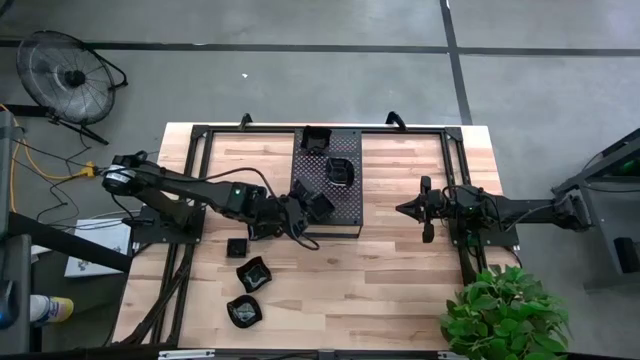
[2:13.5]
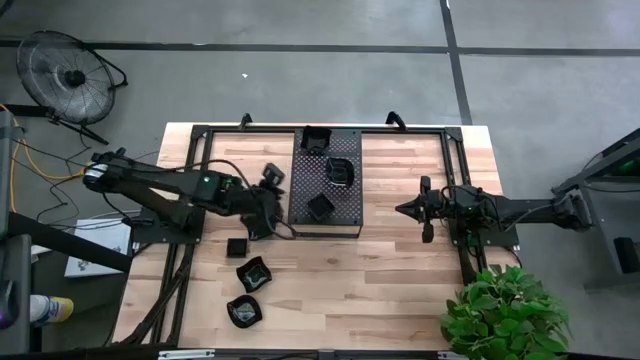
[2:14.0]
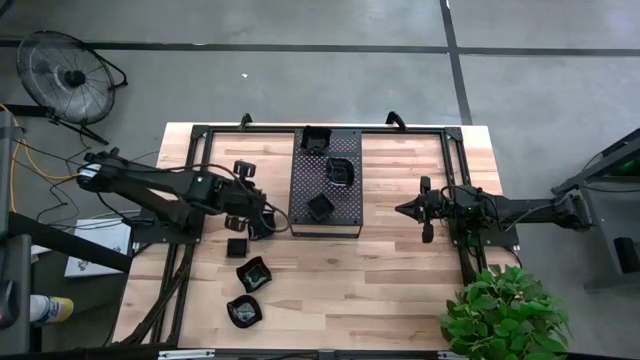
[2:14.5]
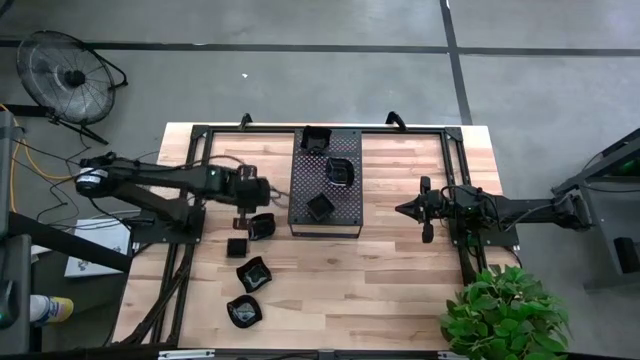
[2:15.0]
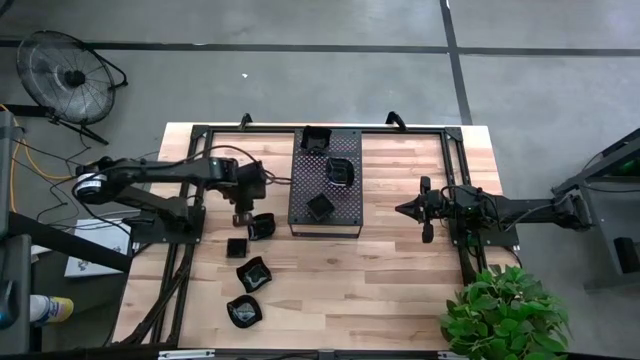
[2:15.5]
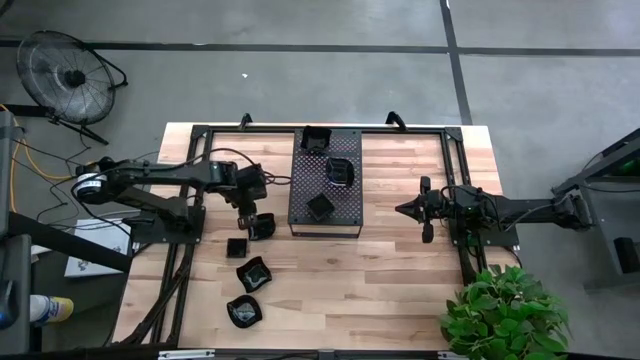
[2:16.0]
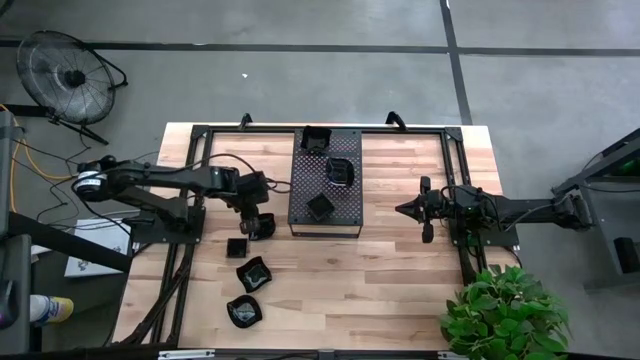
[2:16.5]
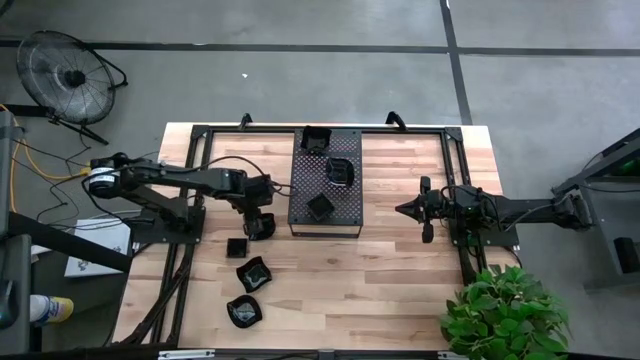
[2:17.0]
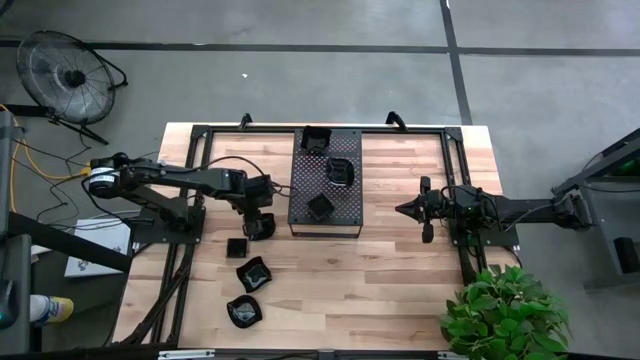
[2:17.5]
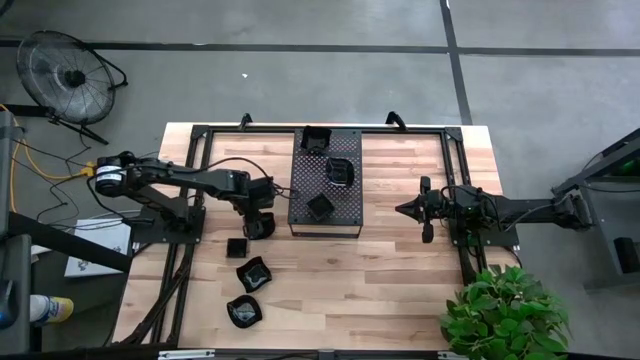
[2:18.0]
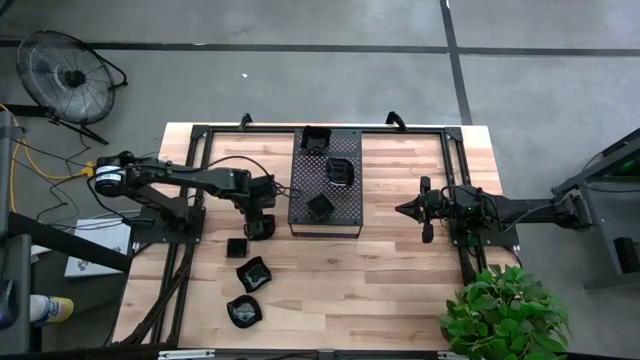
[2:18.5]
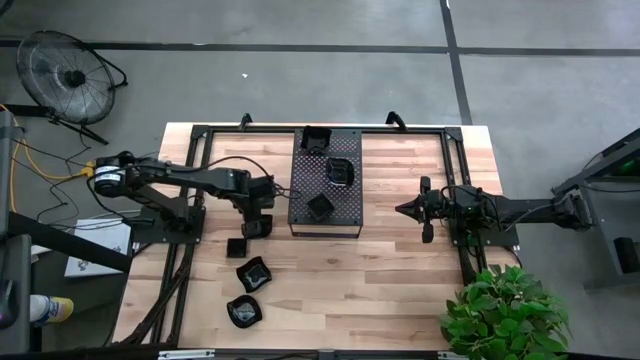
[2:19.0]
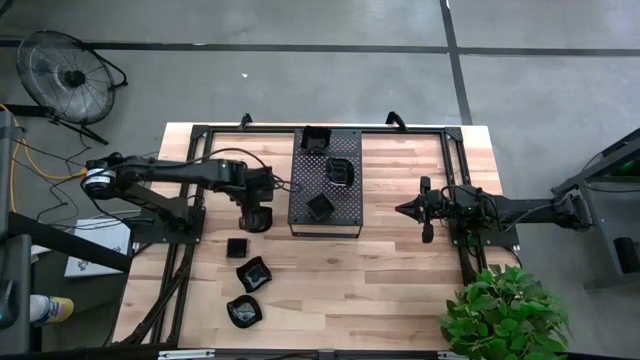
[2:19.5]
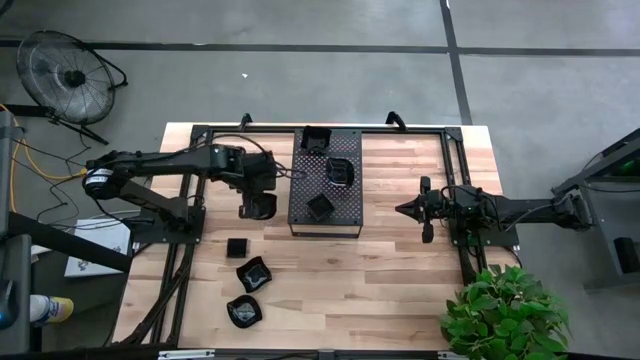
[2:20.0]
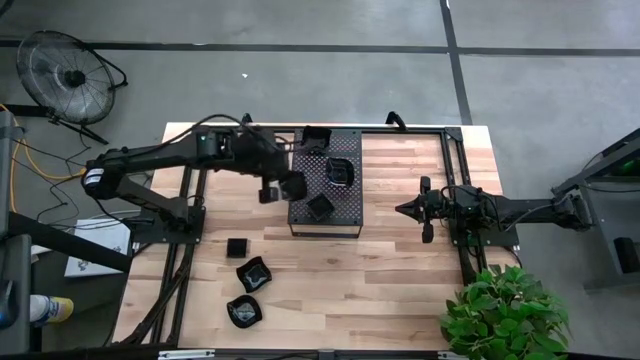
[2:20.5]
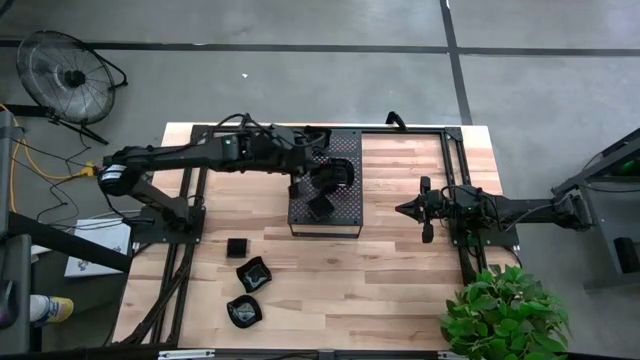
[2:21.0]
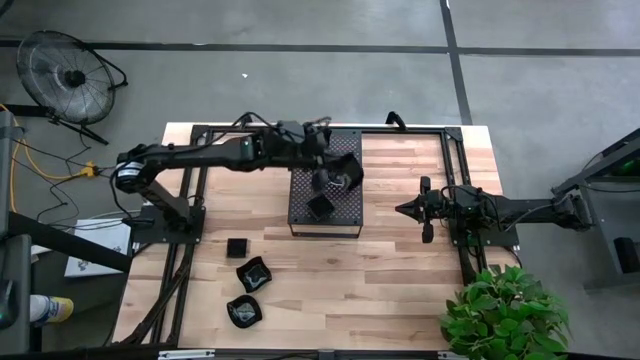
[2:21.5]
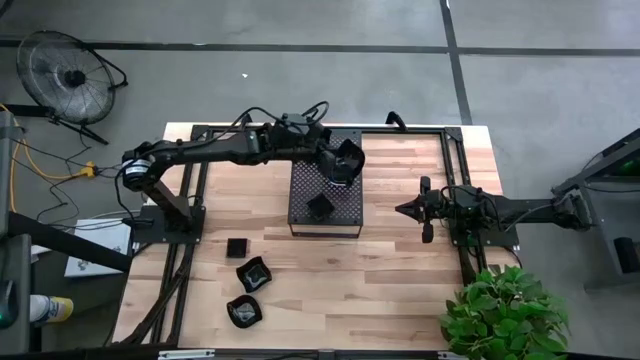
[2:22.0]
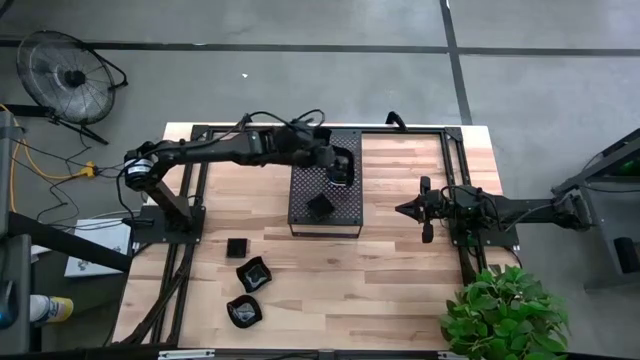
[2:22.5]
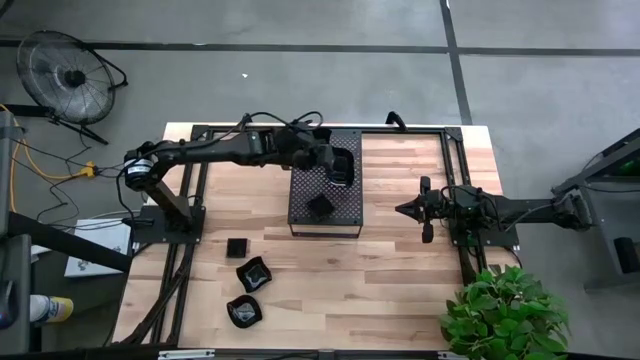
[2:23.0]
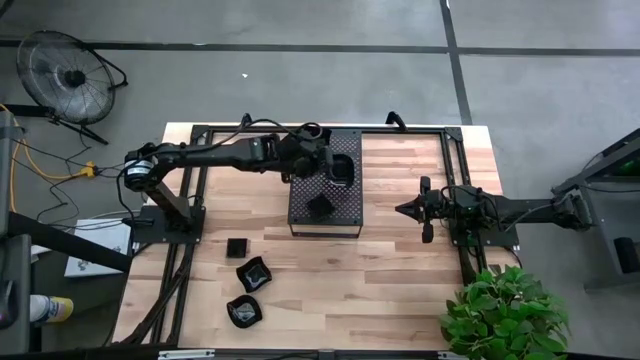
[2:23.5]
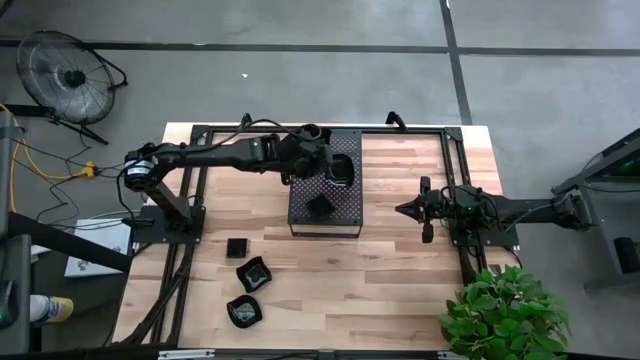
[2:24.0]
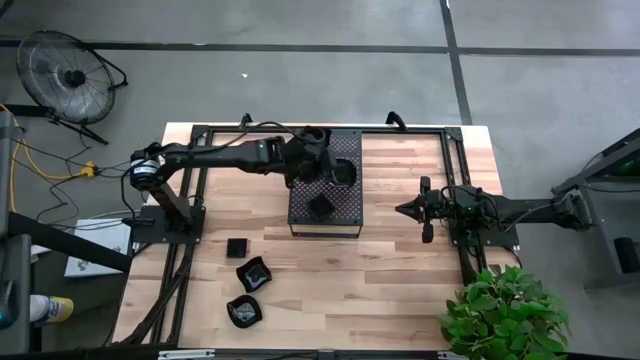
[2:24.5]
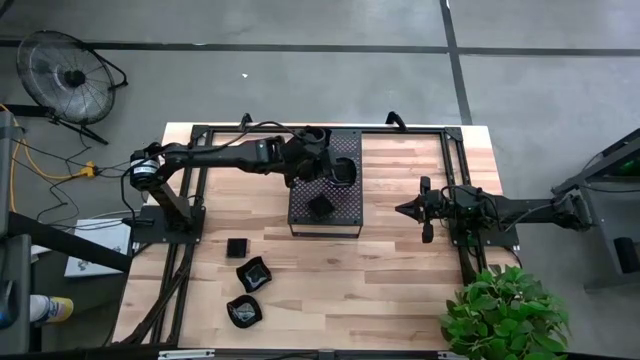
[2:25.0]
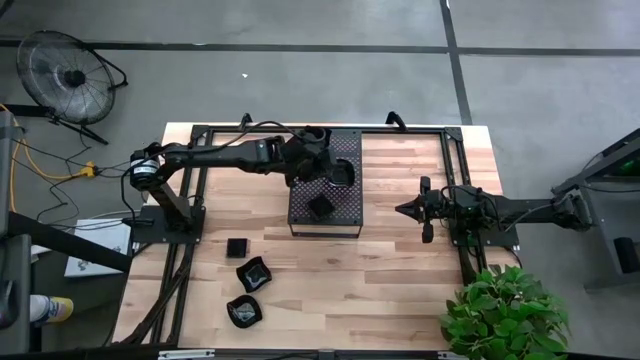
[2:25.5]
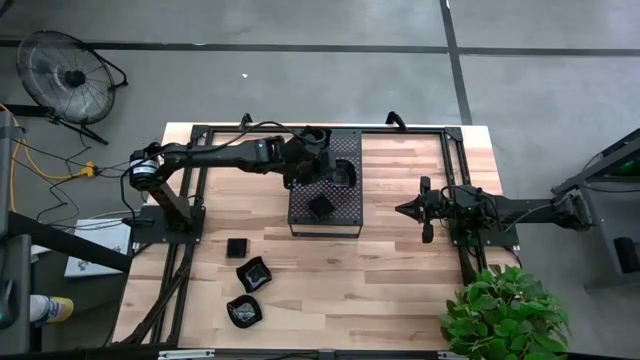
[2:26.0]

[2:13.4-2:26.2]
Task: Pick & Place Mini shaped plates
Stack the black leaf shape plate on top of the other black leaf shaped plate on the shelf

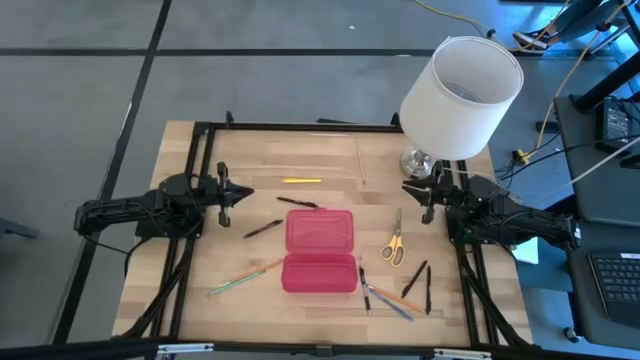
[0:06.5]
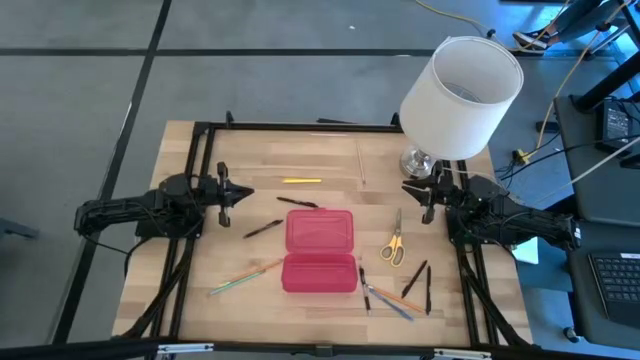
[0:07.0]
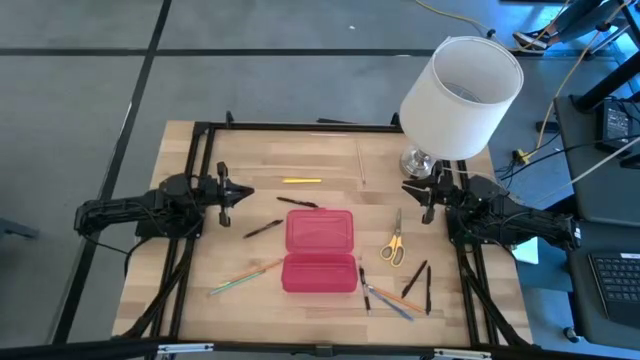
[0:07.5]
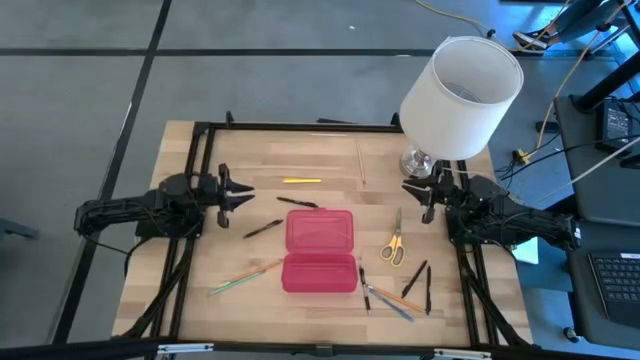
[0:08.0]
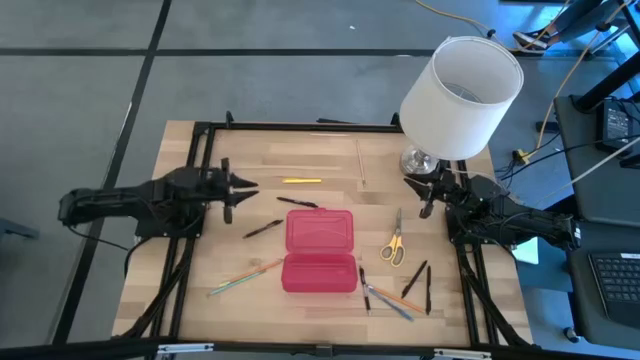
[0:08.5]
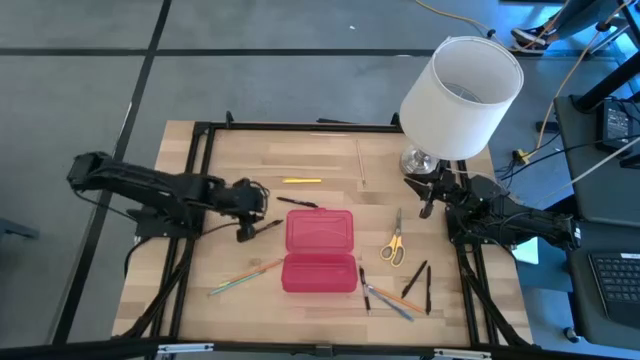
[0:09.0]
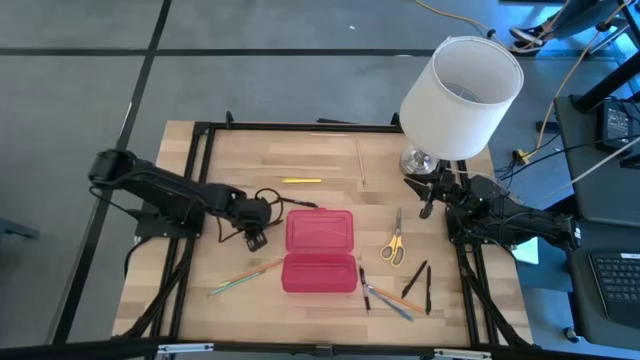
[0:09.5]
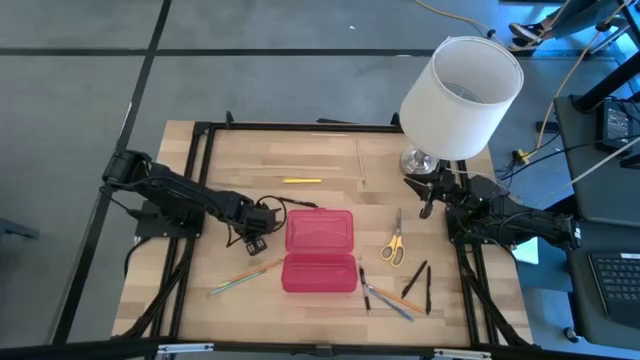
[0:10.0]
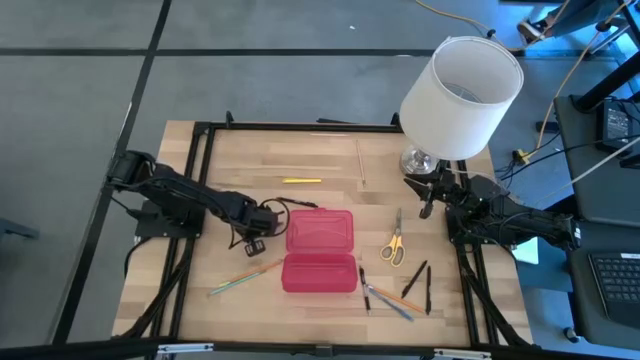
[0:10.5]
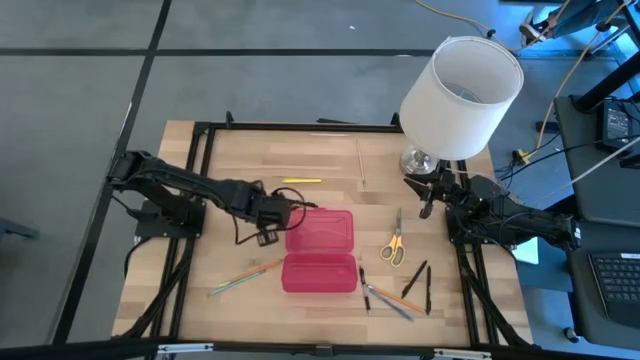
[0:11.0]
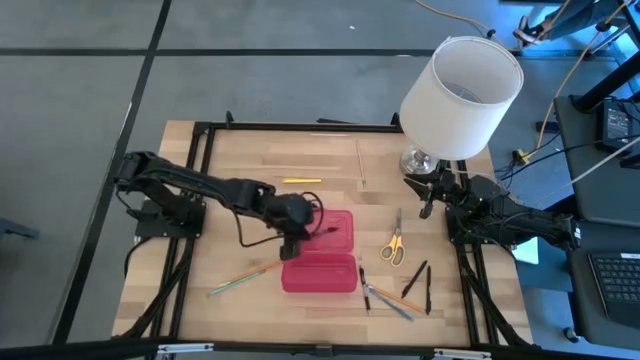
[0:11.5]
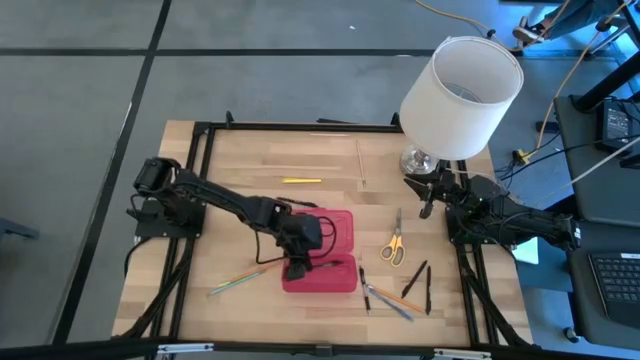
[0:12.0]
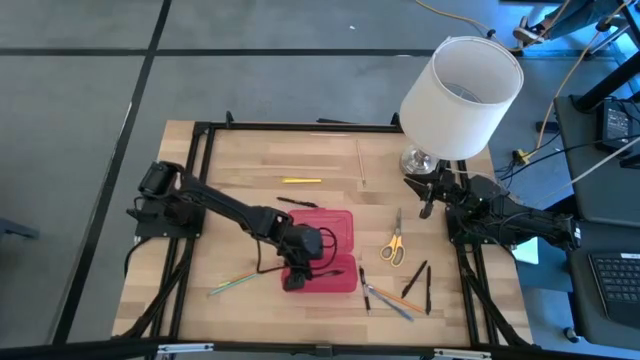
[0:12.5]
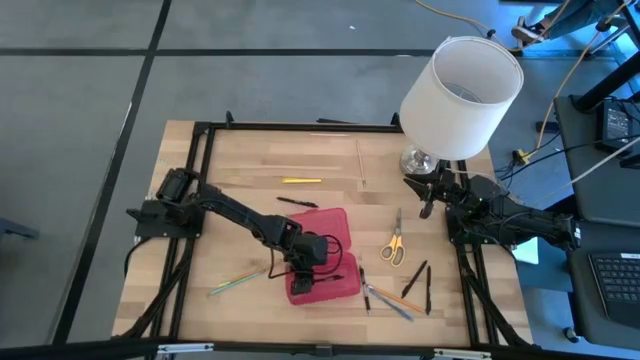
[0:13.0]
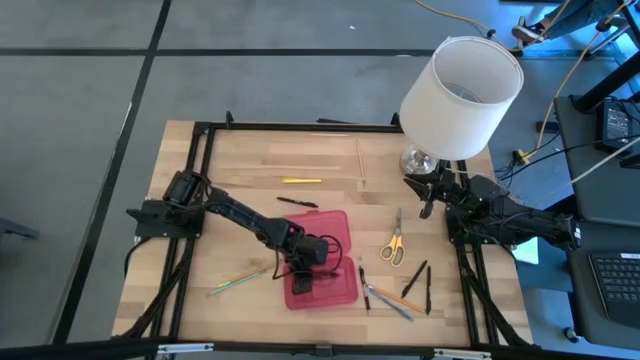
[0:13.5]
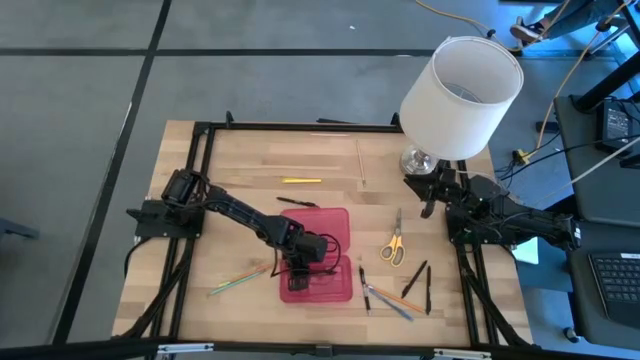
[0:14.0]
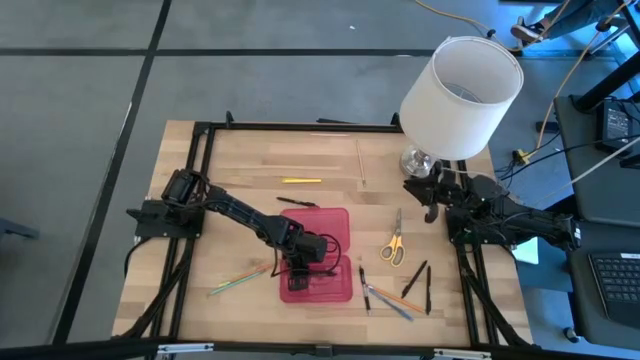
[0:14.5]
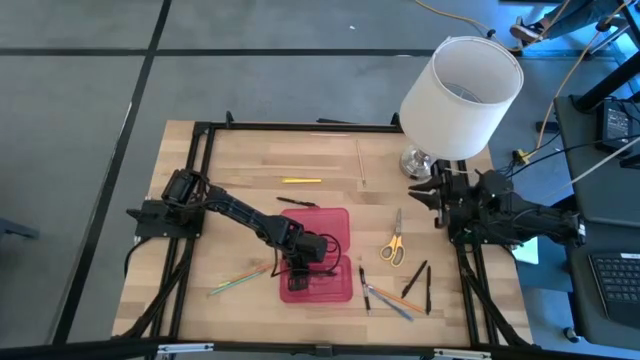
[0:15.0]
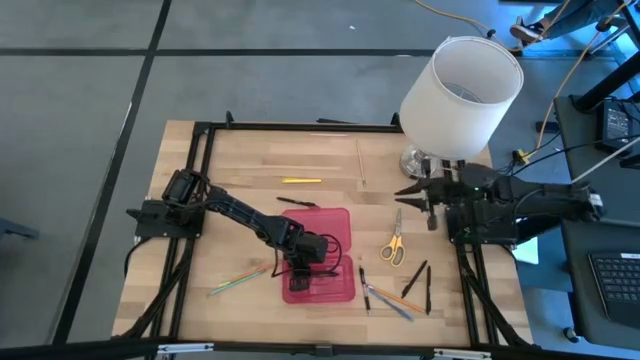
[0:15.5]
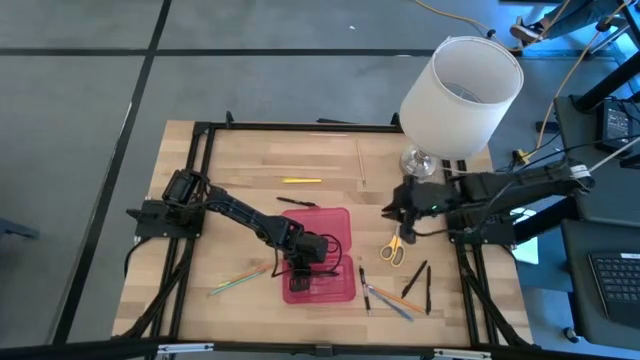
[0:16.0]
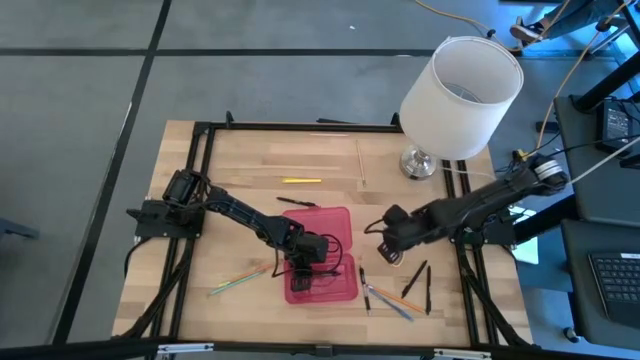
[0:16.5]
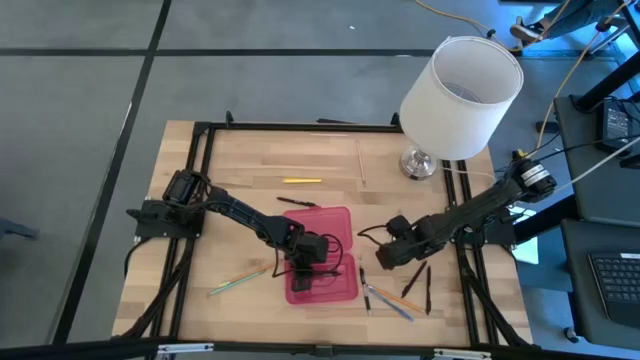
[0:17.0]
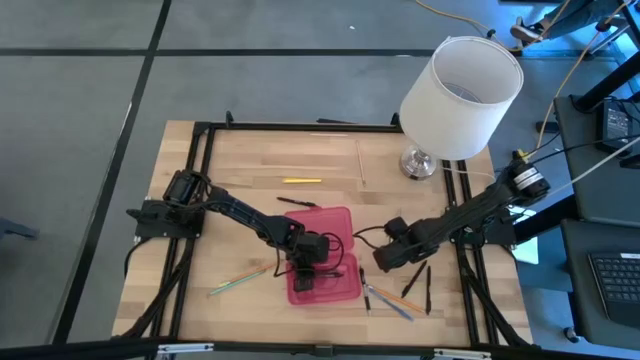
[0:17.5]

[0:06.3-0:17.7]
Task: Pick & place school supplies into a supply box
Put the black pen into the red supply box
